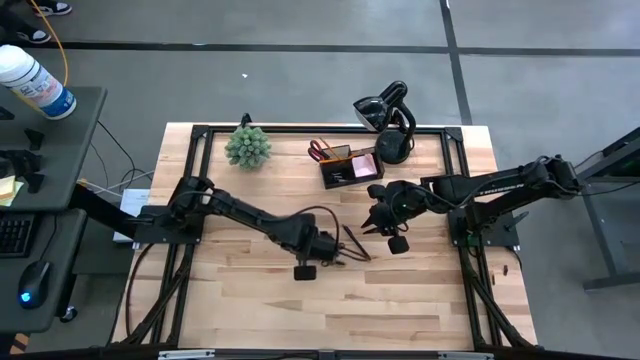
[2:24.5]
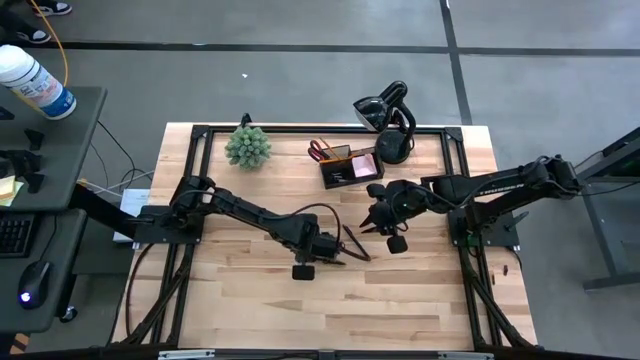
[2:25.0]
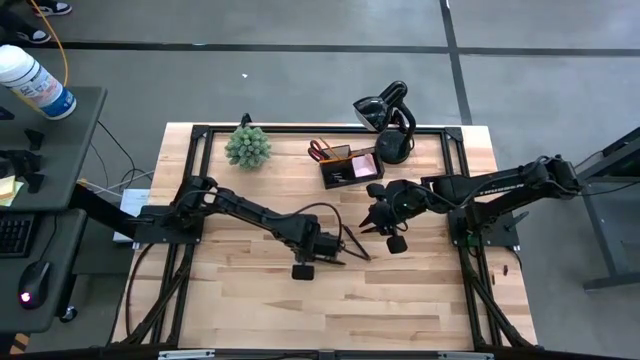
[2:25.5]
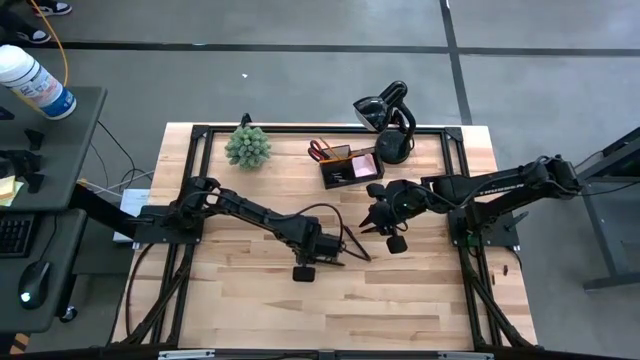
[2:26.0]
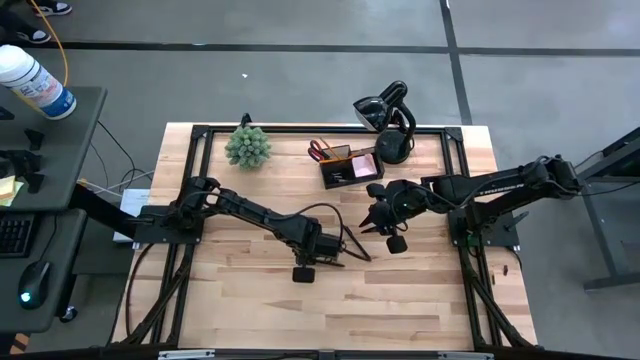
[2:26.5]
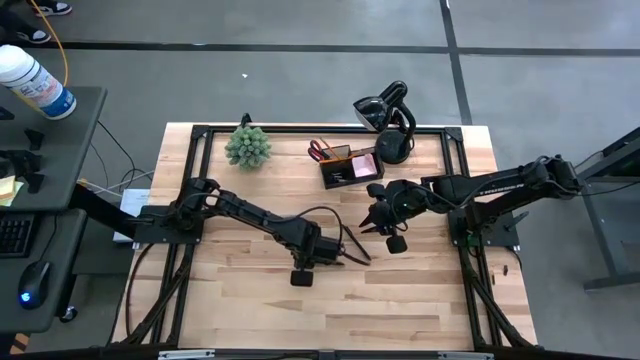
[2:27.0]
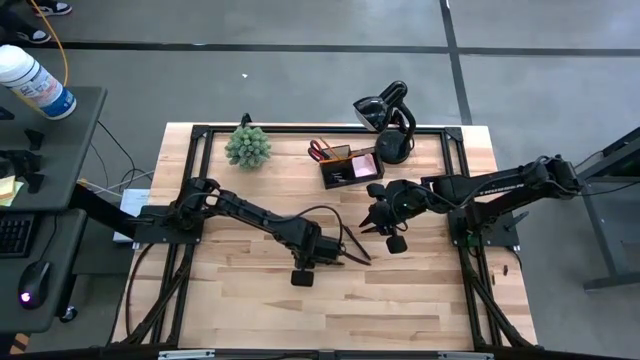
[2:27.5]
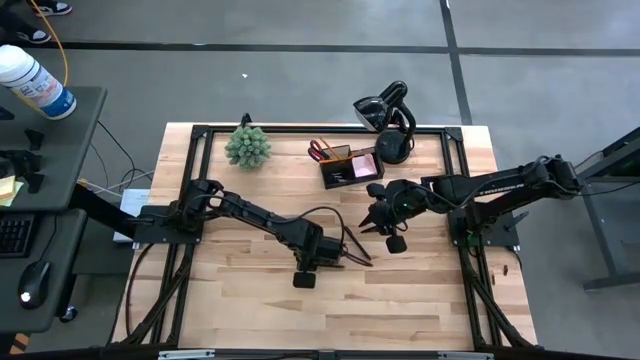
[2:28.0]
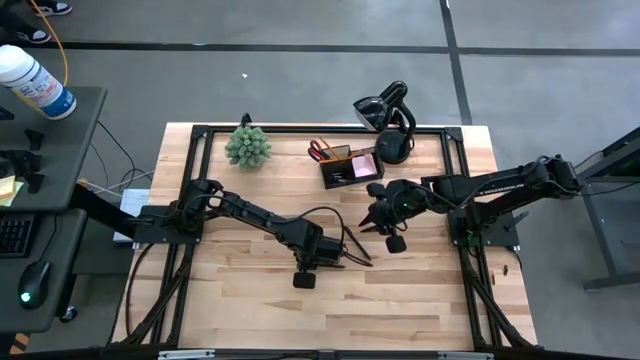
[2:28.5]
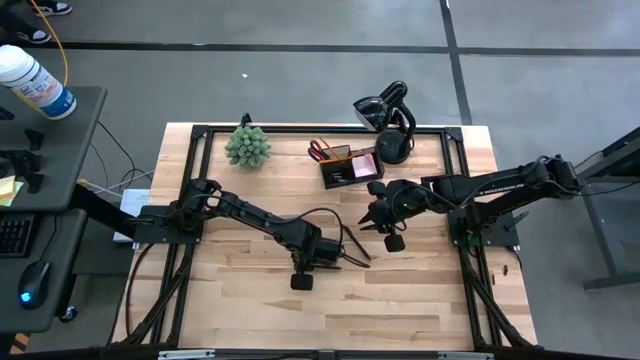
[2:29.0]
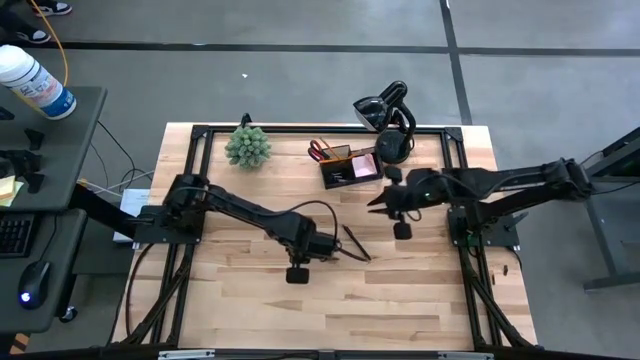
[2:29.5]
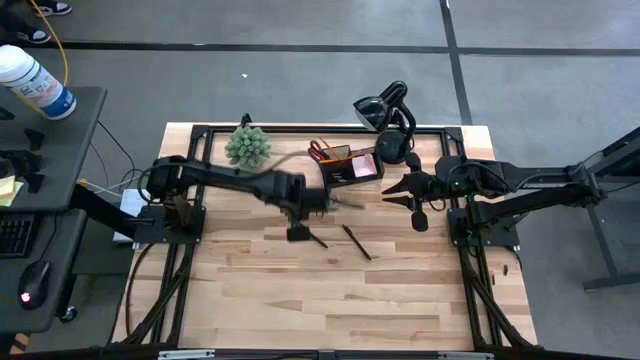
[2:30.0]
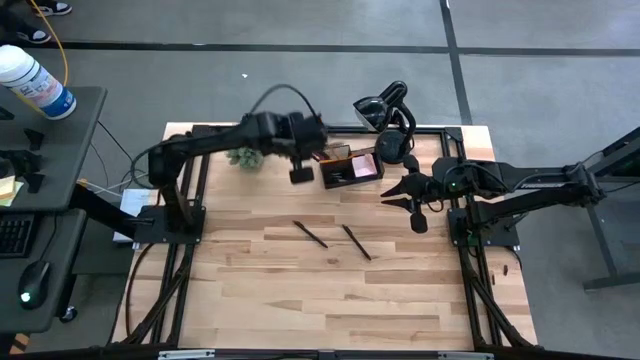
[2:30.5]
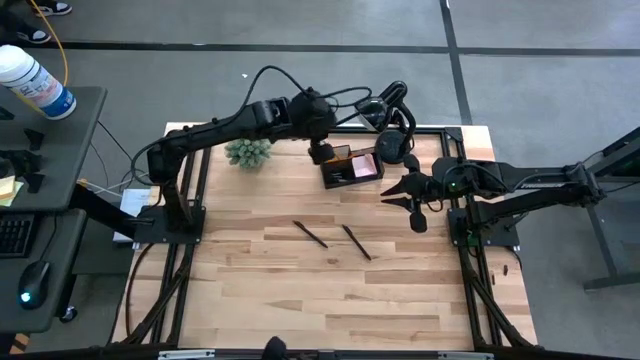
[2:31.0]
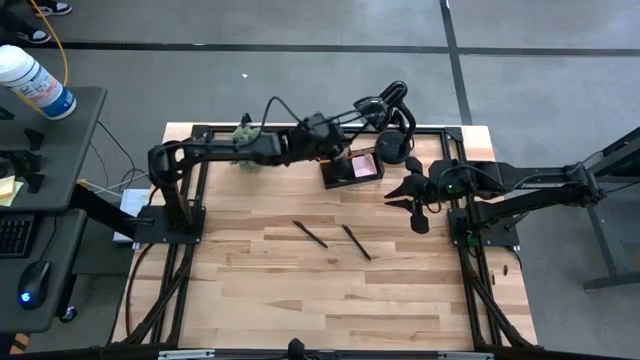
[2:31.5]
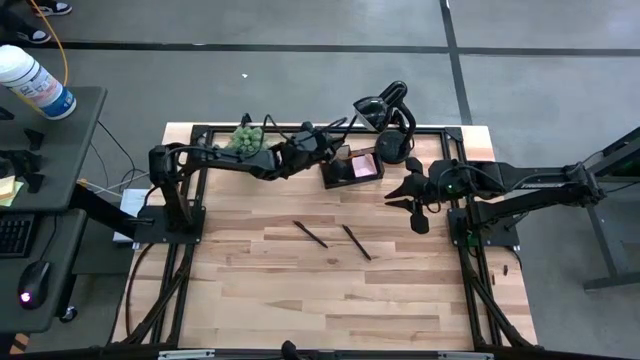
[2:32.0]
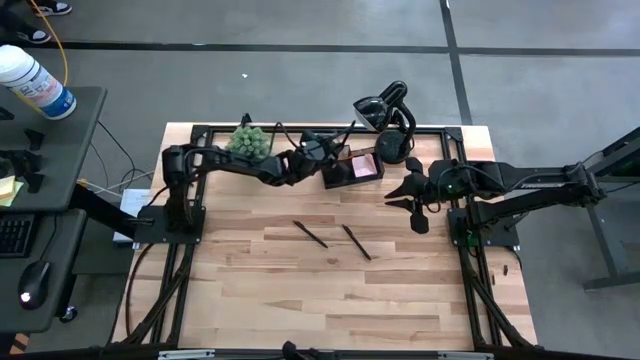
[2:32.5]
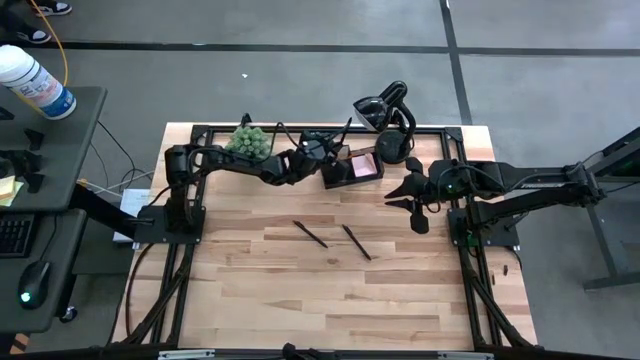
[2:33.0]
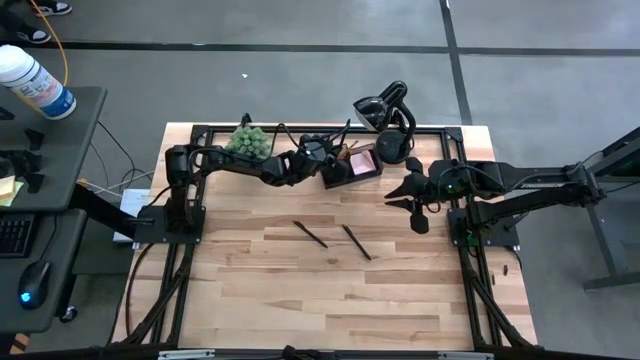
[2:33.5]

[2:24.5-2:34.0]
Task: Pick and place office supplies into organizer
Put the bottom black pen into the black desk organizer

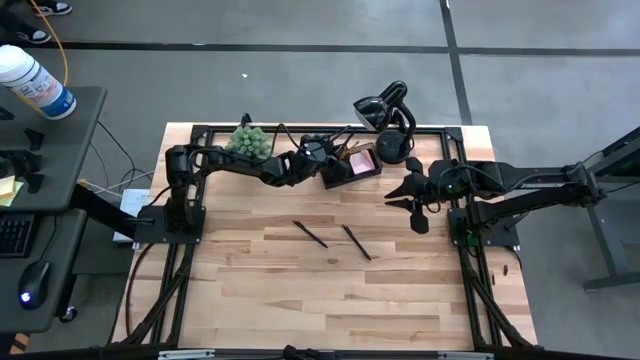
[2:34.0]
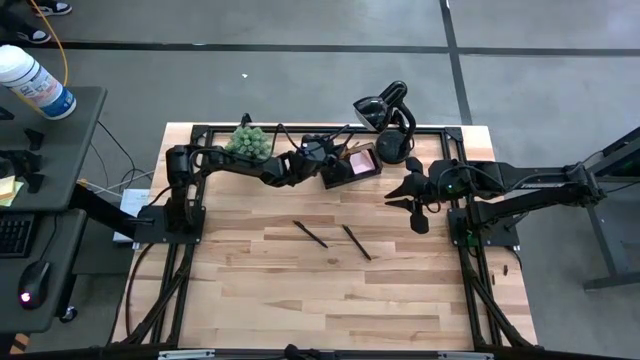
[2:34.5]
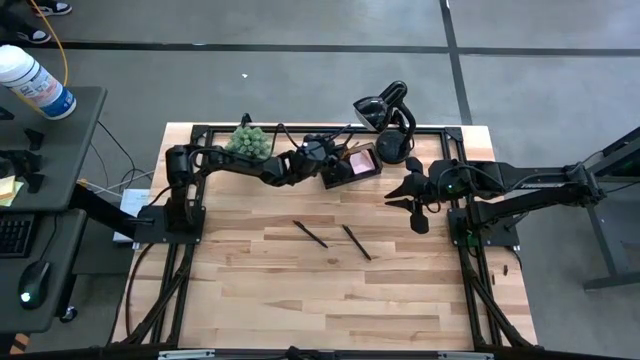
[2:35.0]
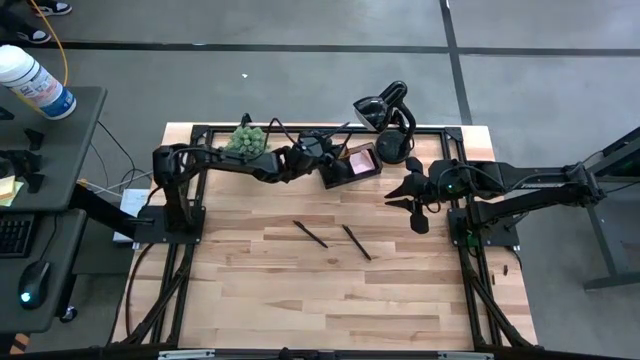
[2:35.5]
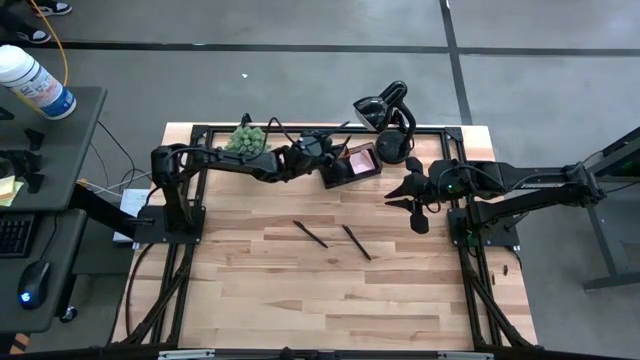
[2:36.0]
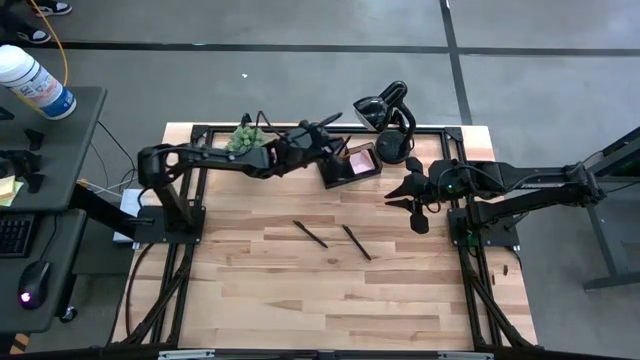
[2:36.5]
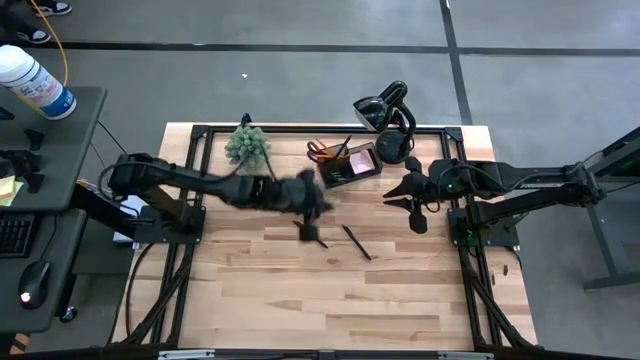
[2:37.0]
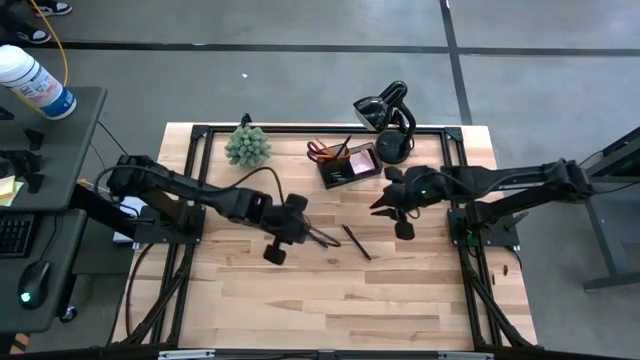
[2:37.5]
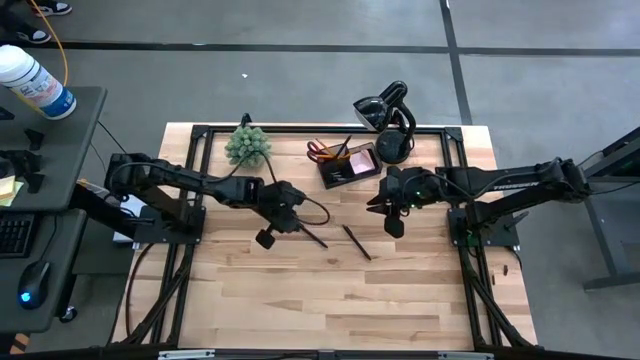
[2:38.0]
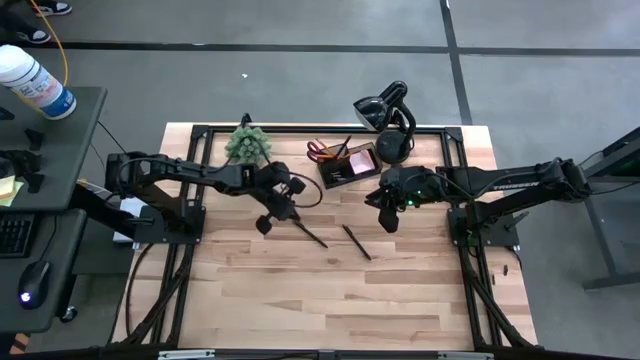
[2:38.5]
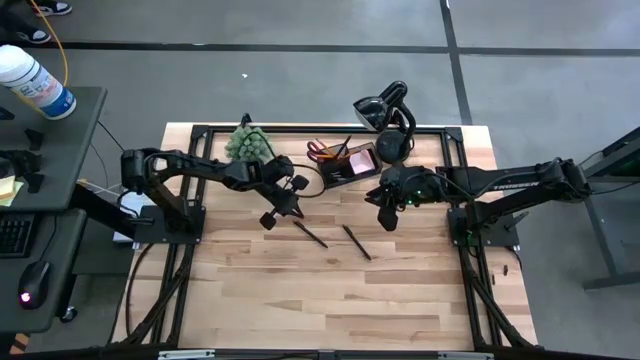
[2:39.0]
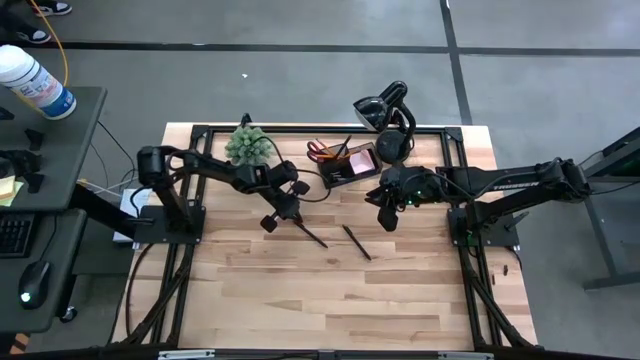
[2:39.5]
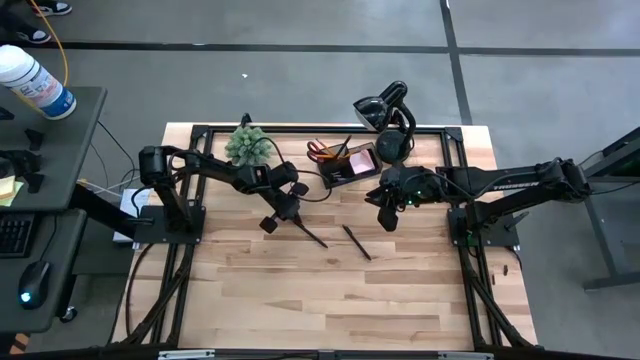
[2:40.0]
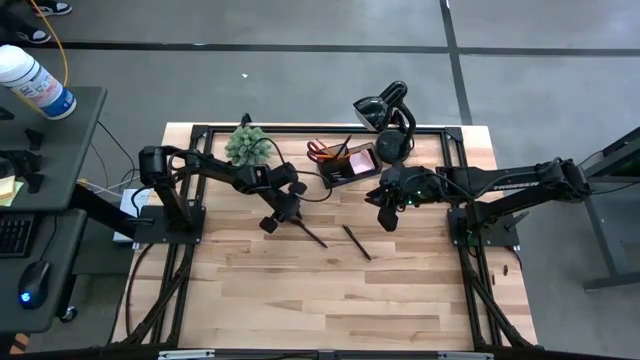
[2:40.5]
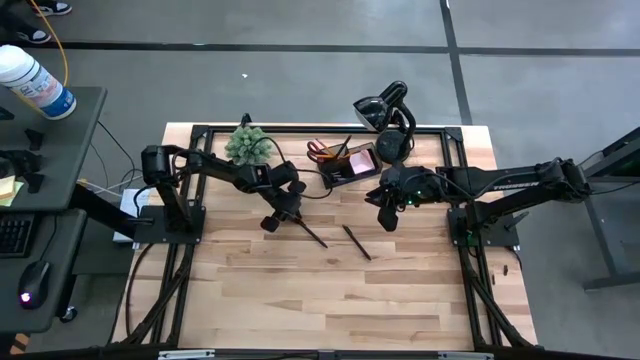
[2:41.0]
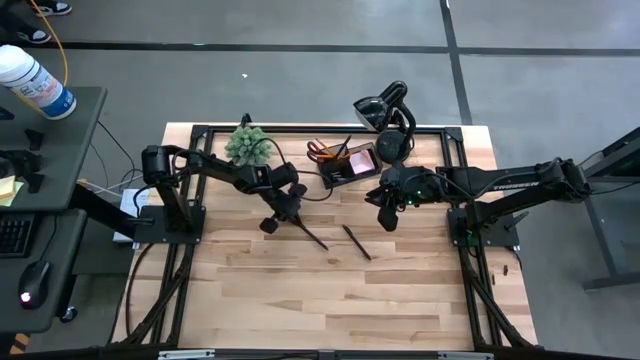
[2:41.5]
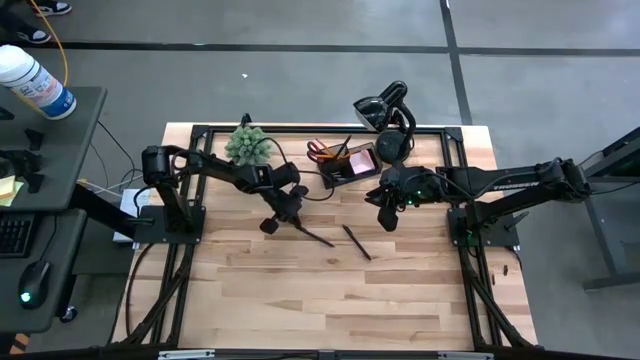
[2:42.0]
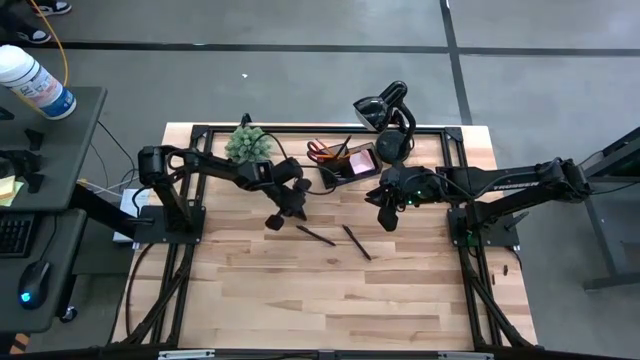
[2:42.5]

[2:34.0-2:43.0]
Put the left black pen into the black desk organizer

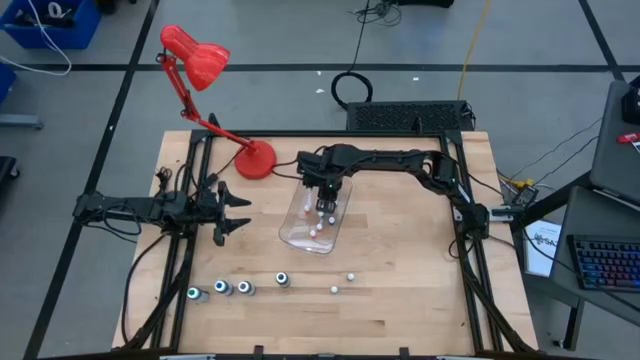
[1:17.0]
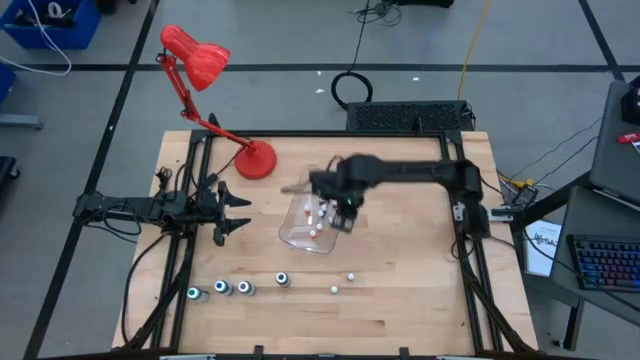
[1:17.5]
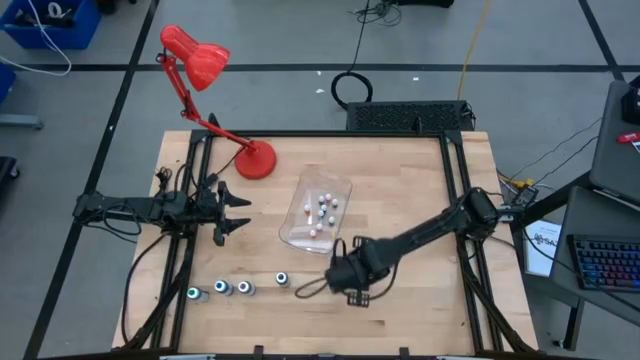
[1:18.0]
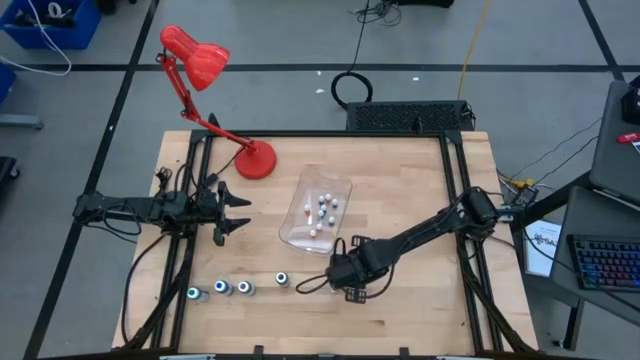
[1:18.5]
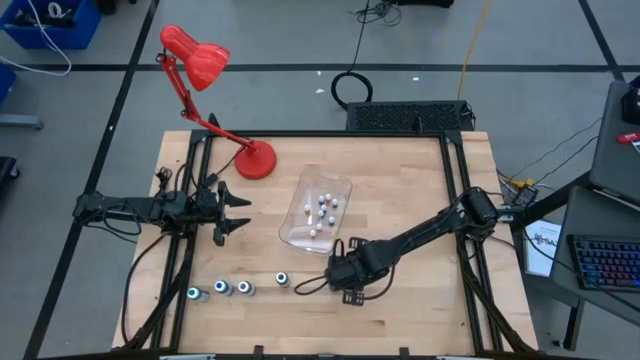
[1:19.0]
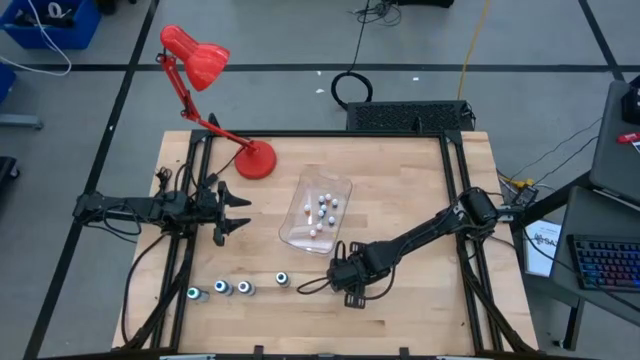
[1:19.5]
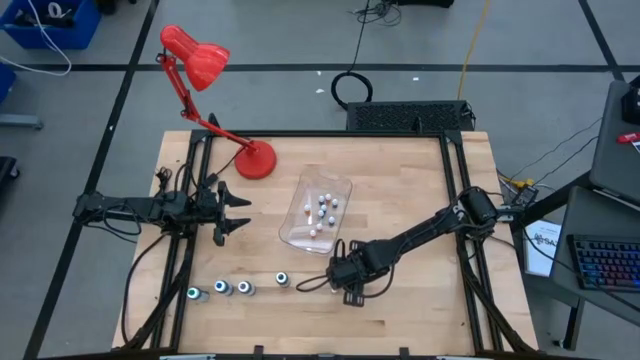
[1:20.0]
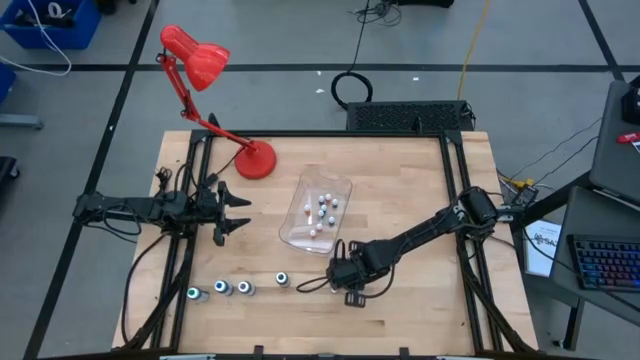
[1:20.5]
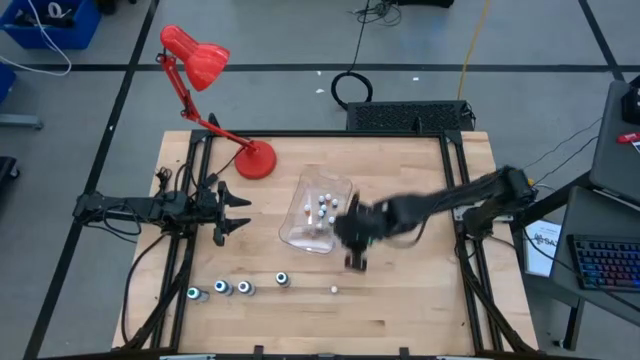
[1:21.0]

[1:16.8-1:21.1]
Task: Pick & Place food coloring
Put the small purple food coloring bottle into the transparent bin
